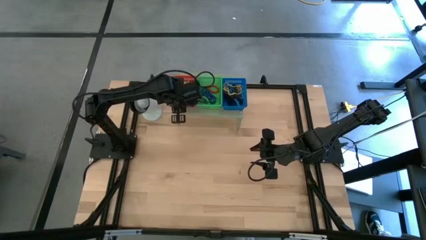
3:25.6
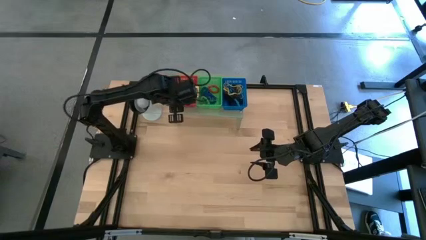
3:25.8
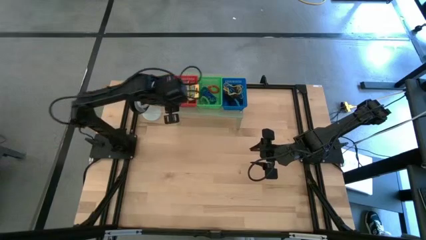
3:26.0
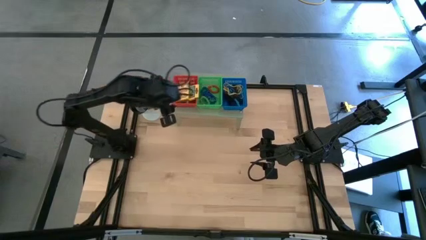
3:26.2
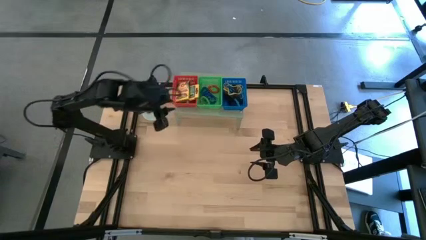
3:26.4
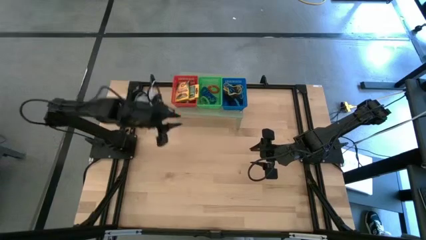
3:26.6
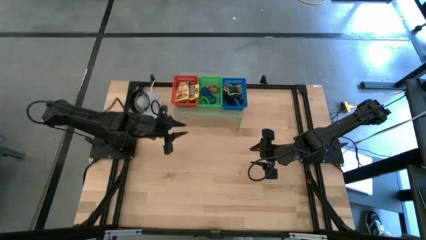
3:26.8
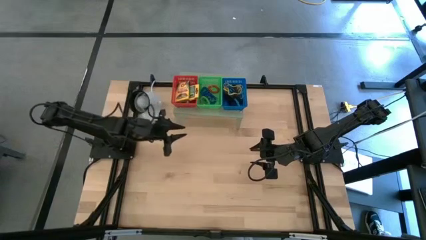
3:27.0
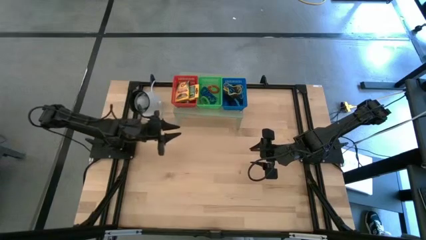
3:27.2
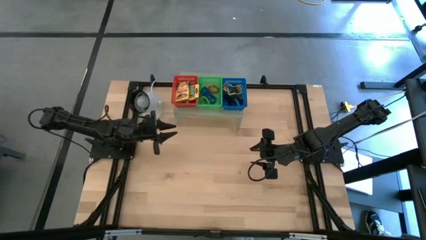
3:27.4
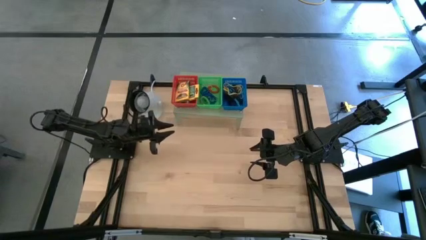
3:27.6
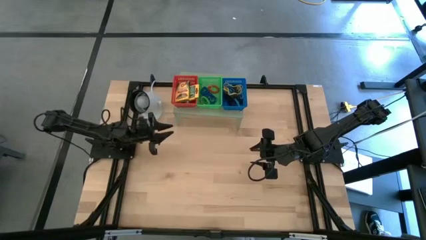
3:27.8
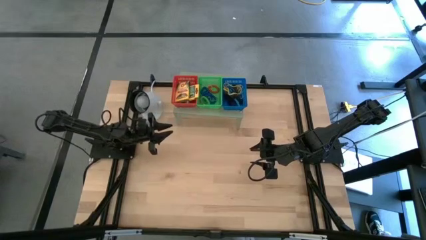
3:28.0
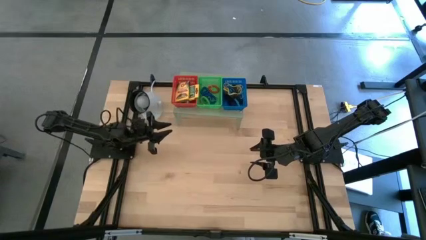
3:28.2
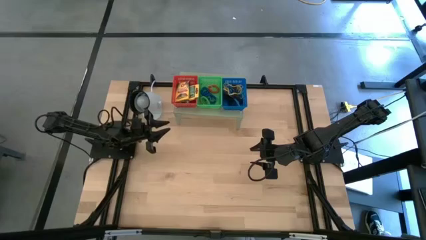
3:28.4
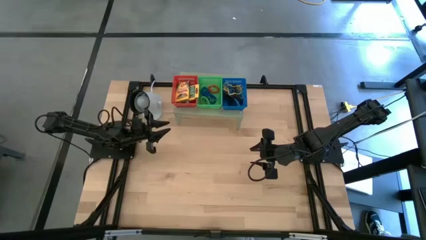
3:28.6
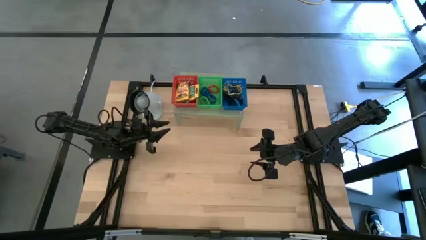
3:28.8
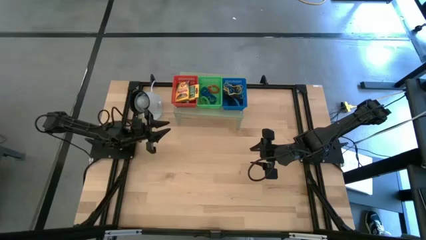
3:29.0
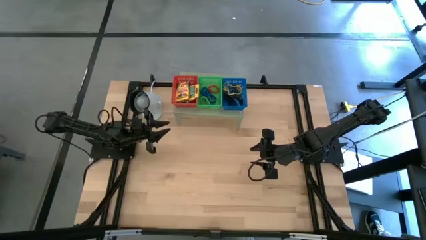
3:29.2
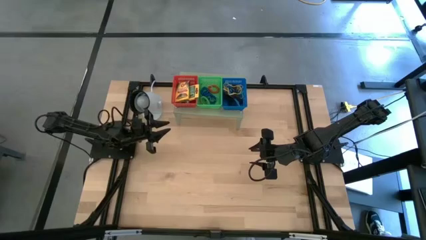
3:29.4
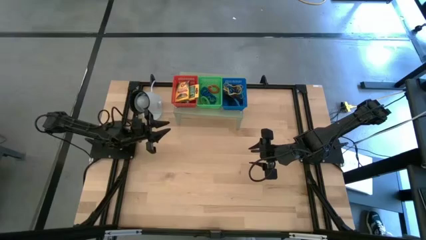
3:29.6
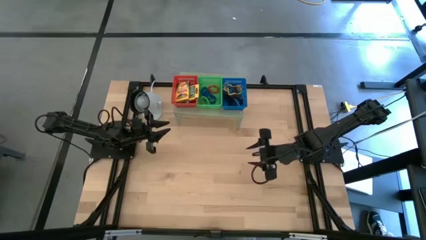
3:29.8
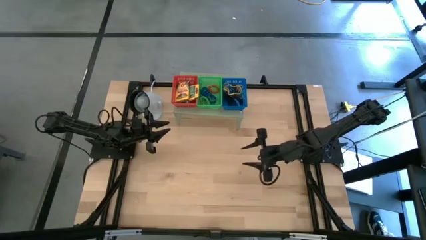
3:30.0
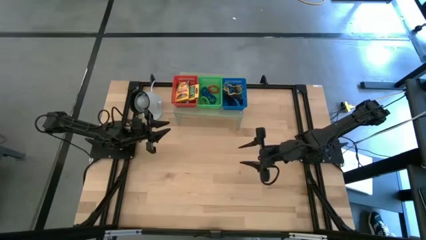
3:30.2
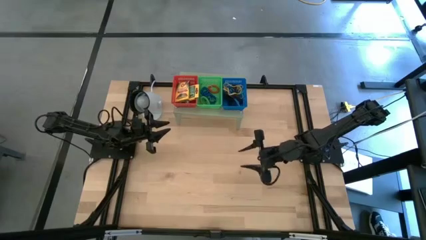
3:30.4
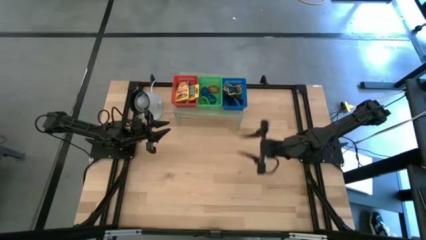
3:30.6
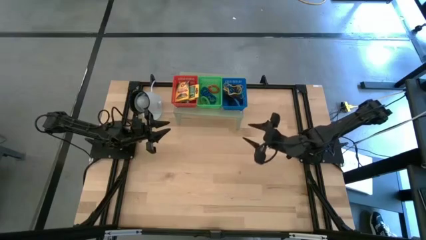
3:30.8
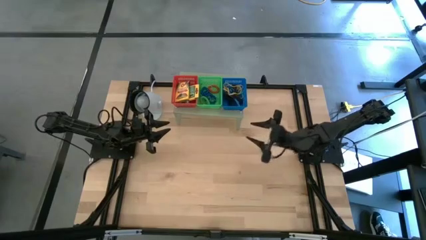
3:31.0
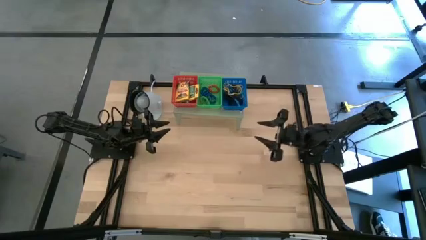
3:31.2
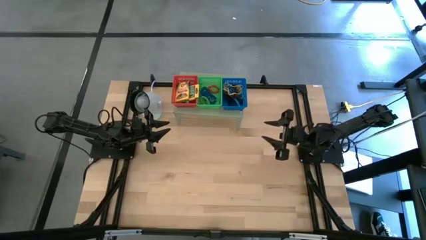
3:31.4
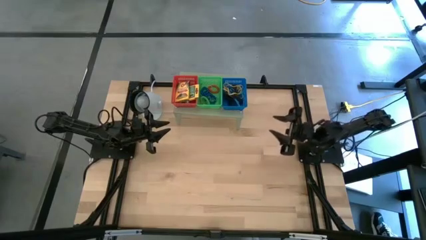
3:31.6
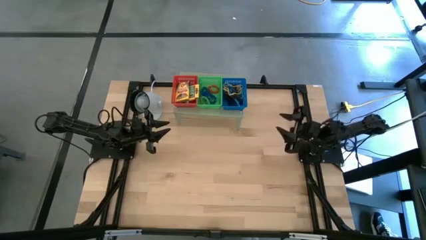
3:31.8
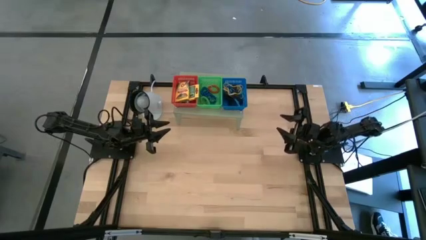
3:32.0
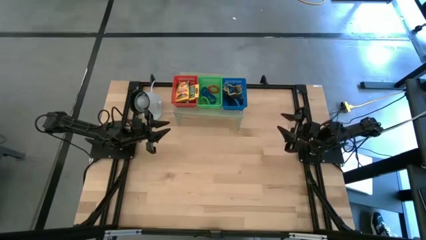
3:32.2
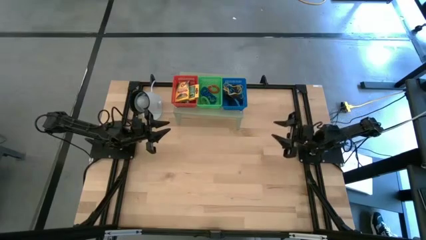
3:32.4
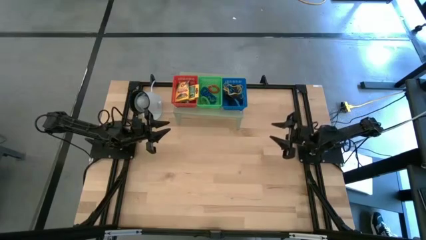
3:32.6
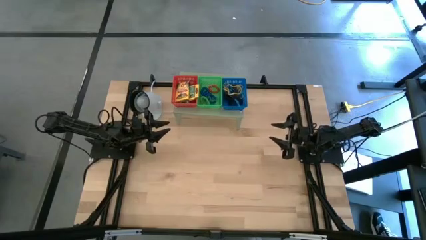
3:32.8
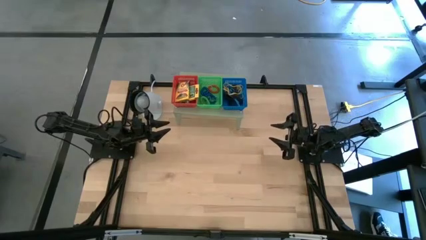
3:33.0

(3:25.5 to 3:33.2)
Task: Pick & Place Office Desk Supplies
Return to Home Position

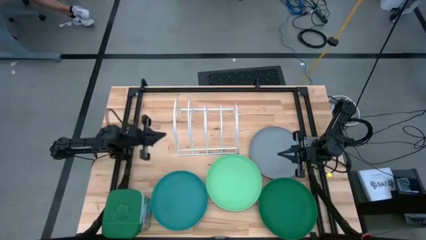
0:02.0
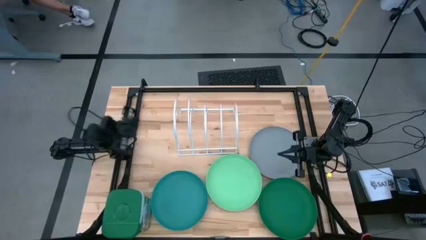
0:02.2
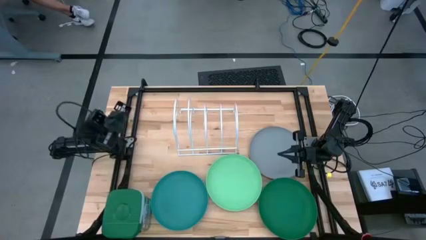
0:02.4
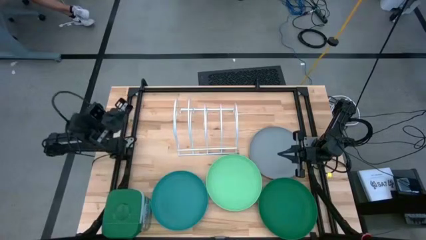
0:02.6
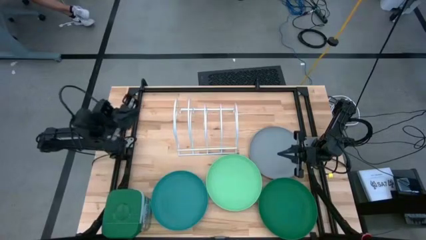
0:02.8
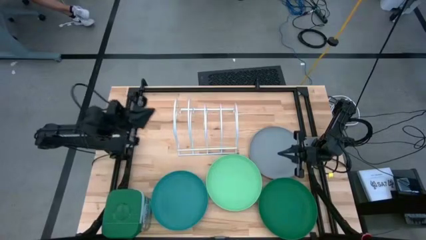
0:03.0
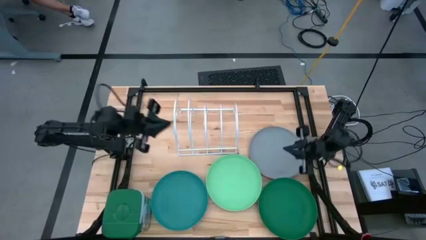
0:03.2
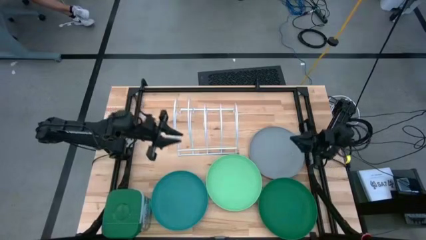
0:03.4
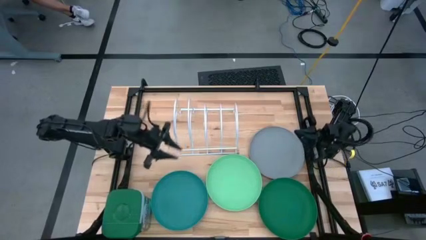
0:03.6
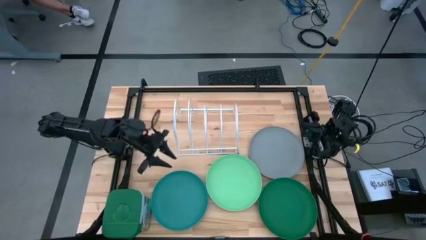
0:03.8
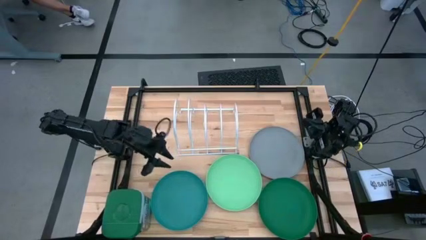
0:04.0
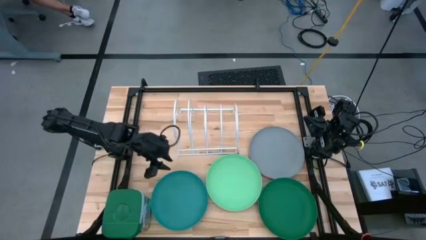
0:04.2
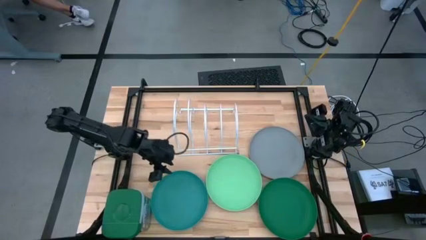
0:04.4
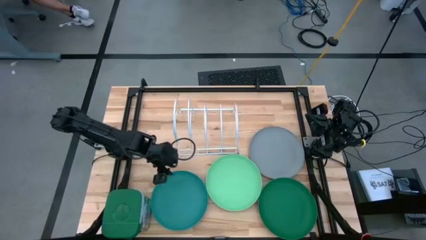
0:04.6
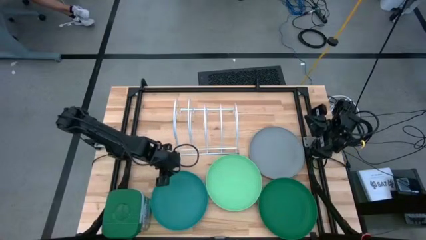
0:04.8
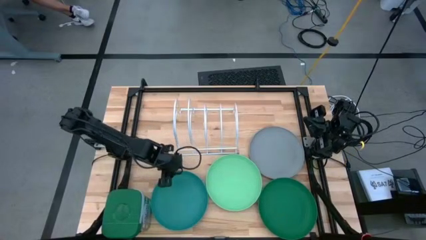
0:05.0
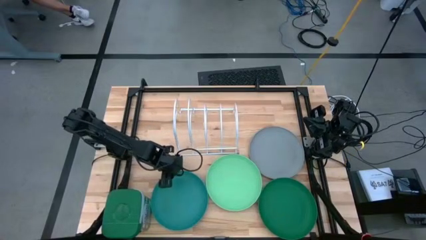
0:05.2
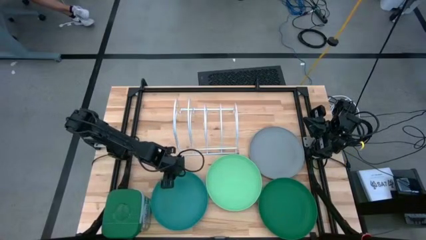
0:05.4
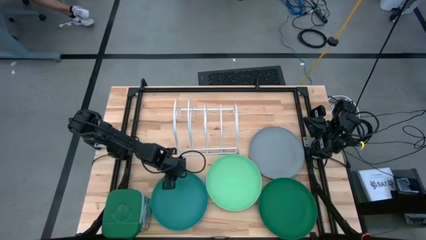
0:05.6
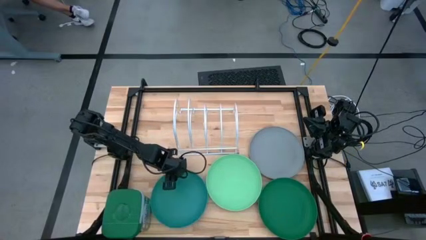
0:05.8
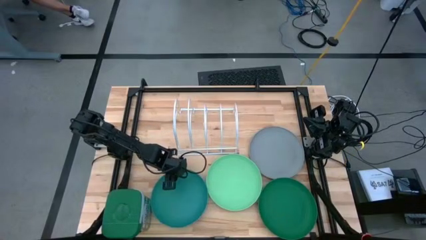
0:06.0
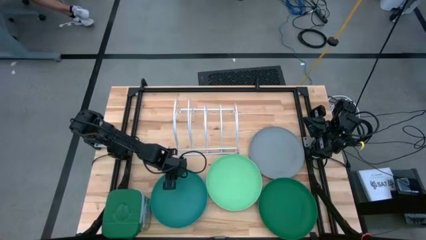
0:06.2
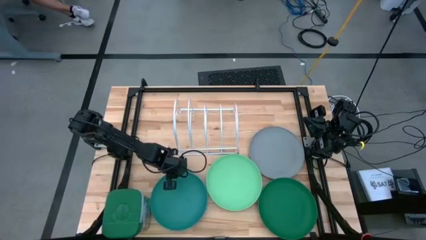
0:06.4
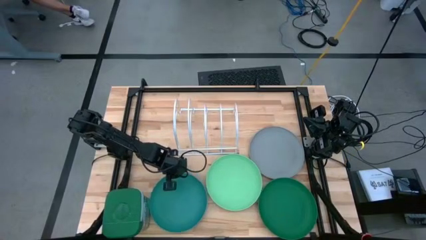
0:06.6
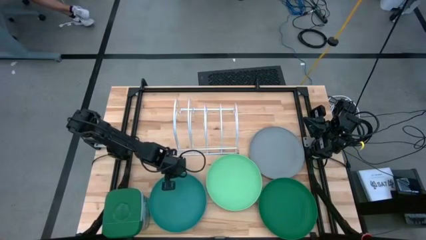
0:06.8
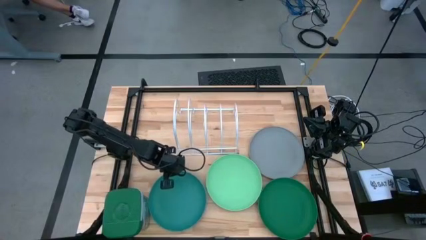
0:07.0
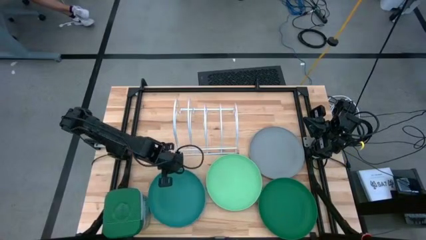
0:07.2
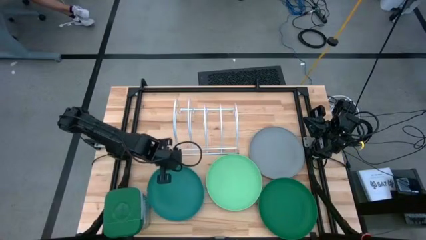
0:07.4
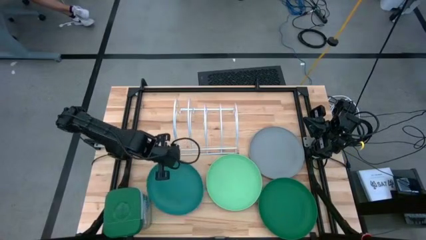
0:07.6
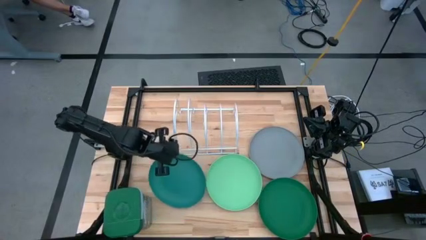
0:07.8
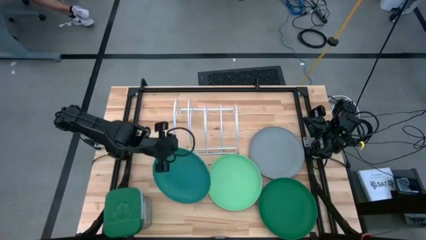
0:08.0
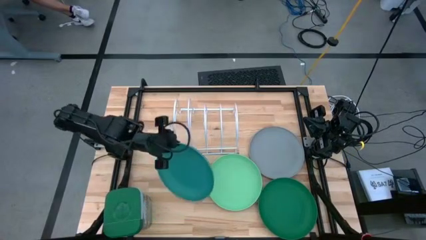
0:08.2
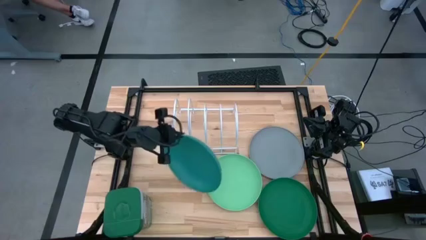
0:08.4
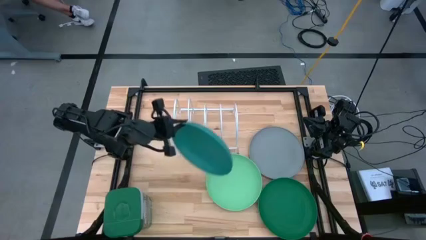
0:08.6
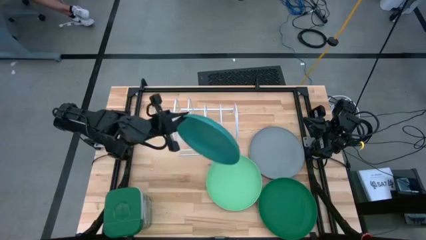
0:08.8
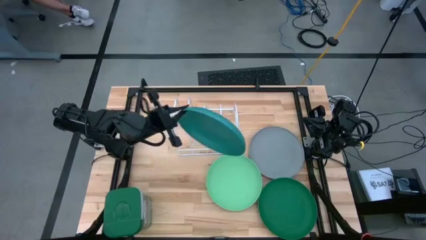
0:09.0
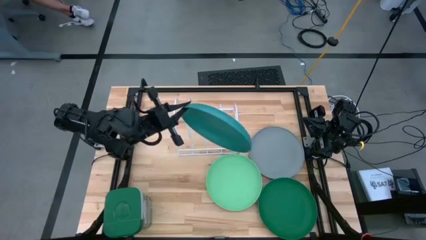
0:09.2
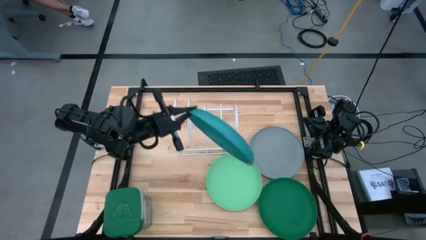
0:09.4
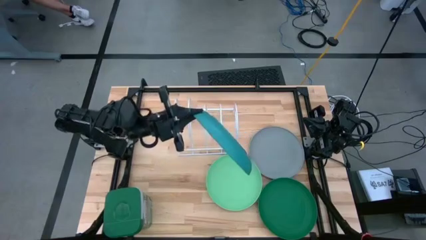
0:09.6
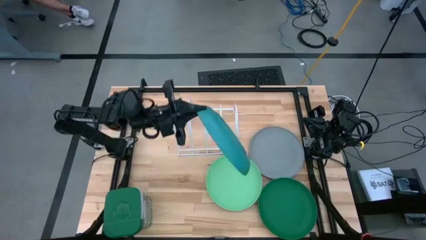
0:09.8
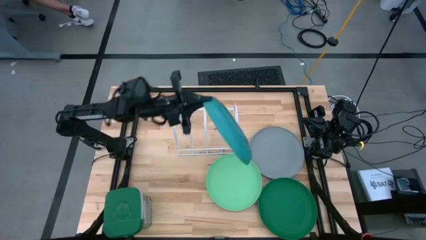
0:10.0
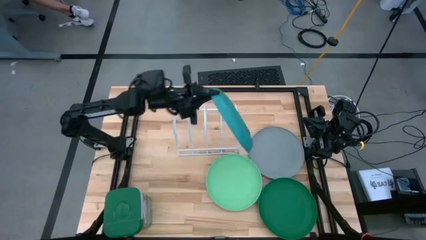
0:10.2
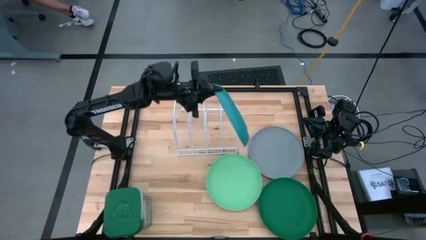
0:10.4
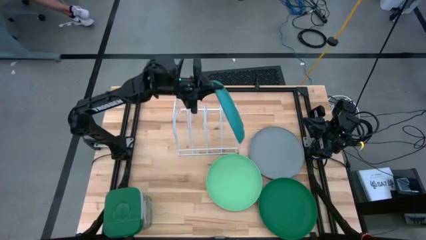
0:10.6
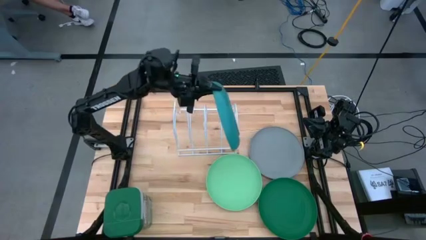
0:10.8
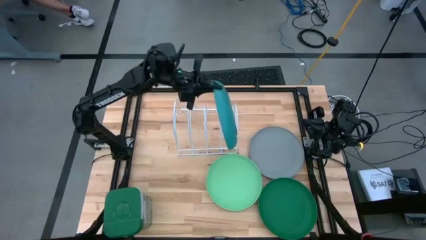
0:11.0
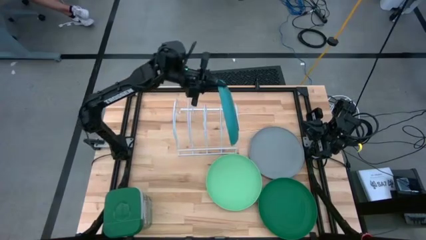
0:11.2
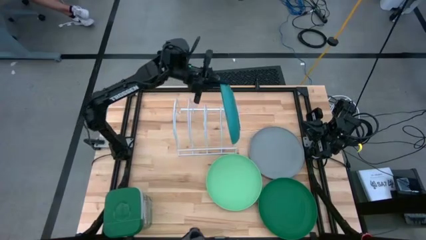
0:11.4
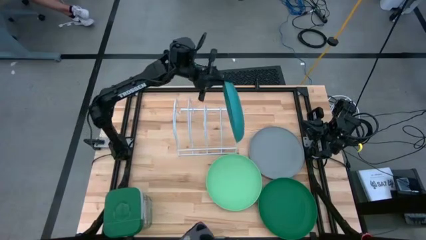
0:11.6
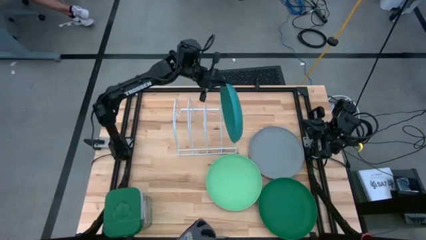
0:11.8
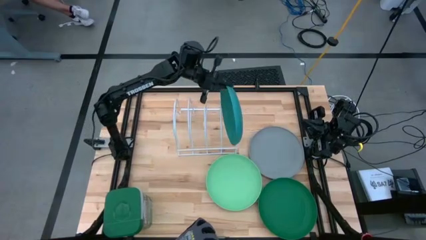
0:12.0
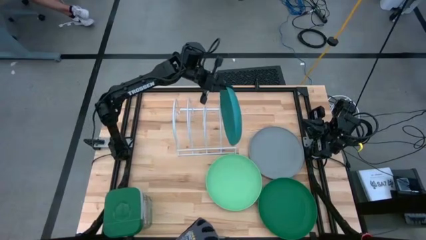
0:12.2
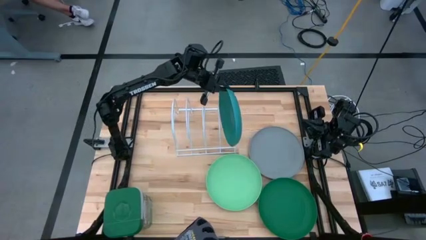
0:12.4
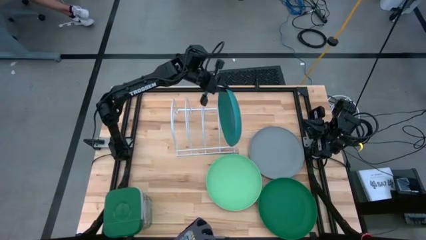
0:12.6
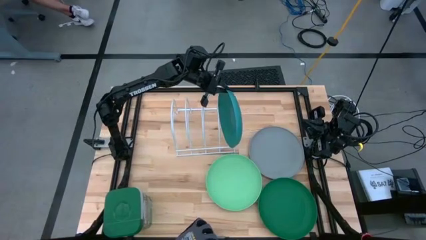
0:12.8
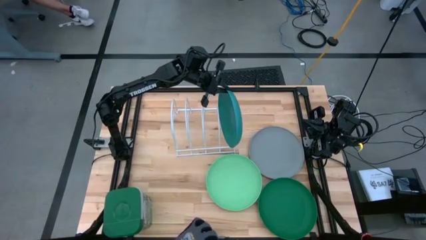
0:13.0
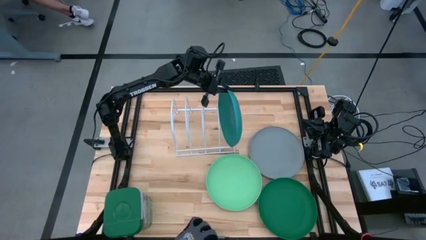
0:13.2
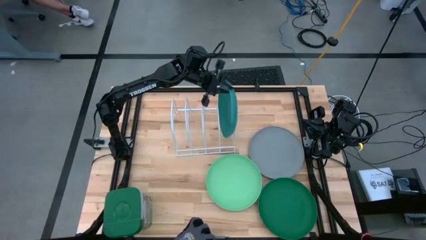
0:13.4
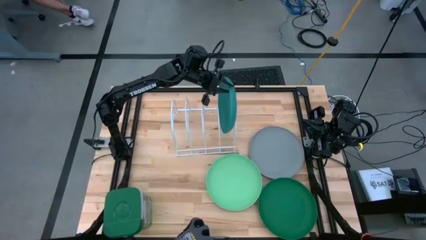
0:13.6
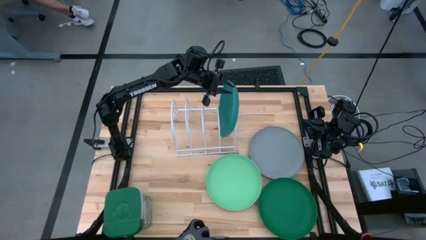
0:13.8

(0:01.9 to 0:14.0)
Task: Sort dishes
Put the dark blue plate into the dish rack
